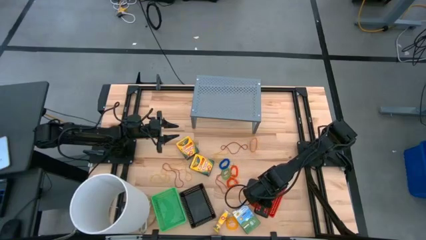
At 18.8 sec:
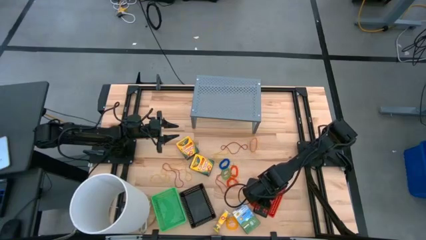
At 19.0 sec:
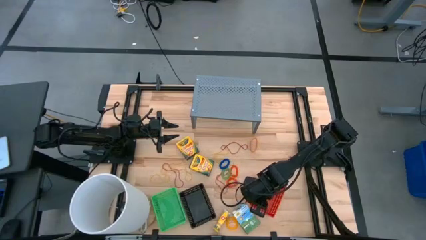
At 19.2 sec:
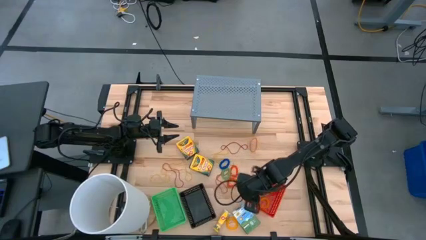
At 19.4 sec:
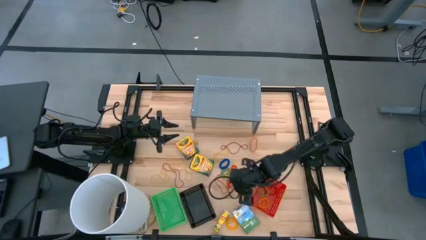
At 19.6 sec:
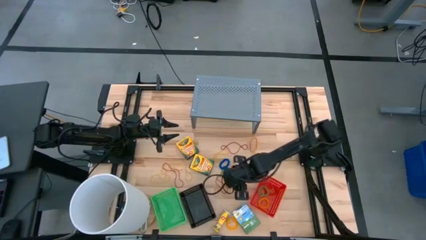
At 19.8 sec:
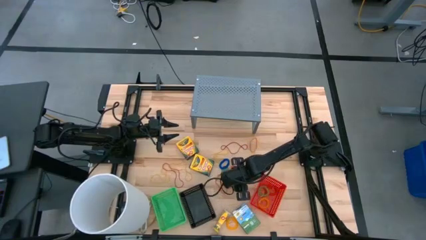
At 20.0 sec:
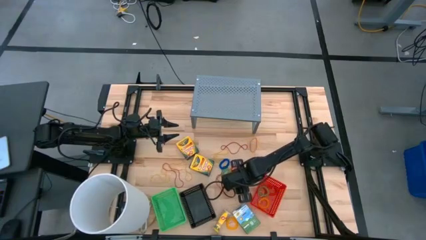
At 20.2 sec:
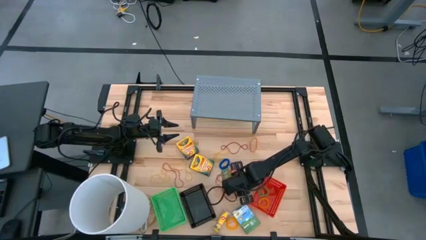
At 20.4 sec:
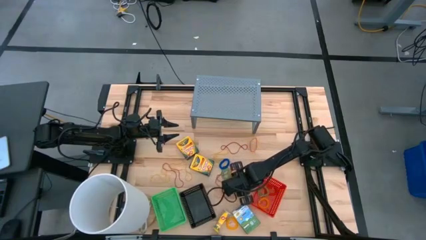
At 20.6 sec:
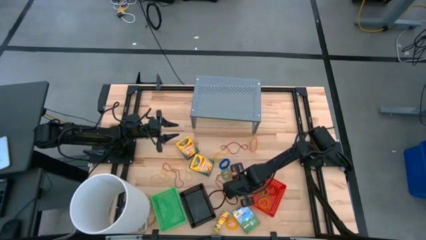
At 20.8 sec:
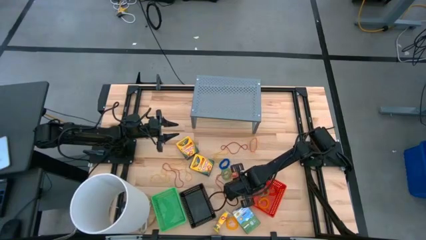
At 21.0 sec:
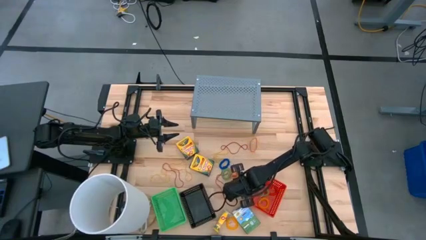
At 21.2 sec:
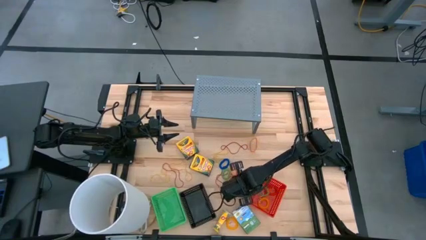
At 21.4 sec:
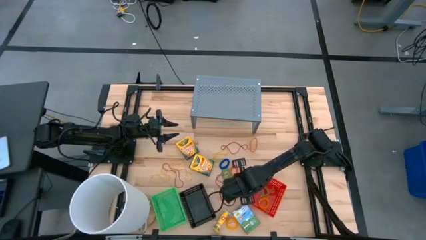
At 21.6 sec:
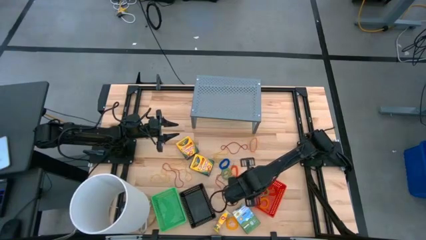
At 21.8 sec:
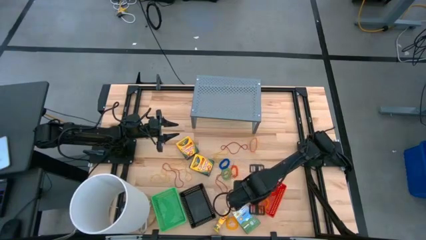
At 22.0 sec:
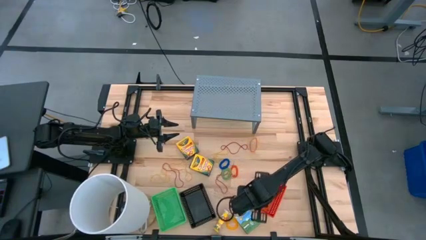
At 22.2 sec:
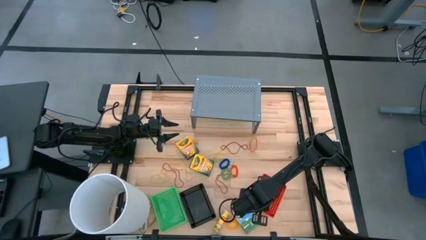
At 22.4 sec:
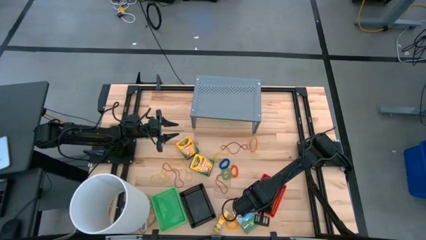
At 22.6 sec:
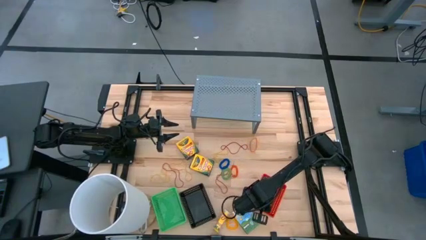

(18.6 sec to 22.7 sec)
Task: Pick & Place Office Desk Supplies
Put the orange spring keychain into the red bin

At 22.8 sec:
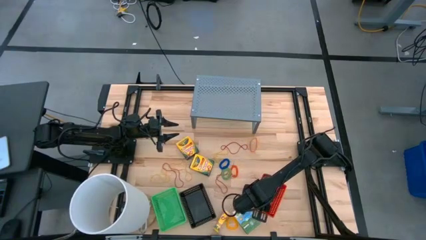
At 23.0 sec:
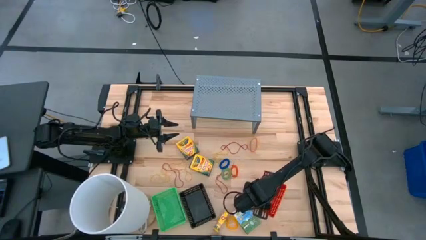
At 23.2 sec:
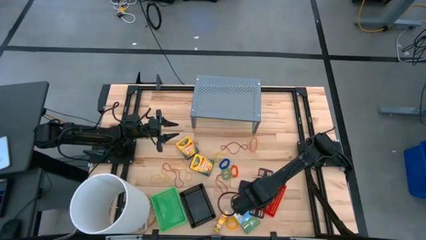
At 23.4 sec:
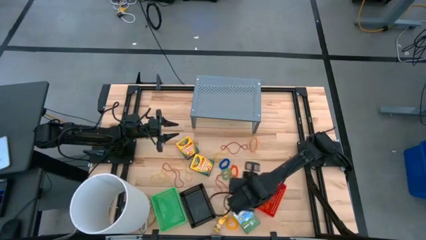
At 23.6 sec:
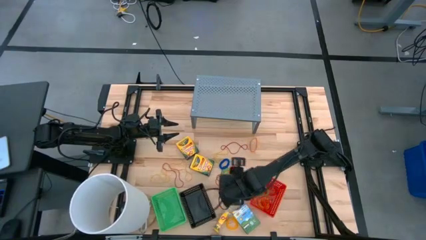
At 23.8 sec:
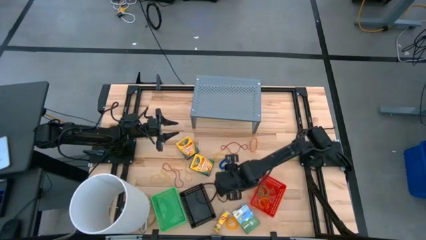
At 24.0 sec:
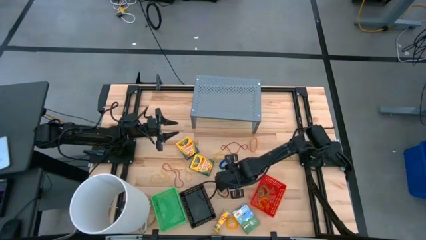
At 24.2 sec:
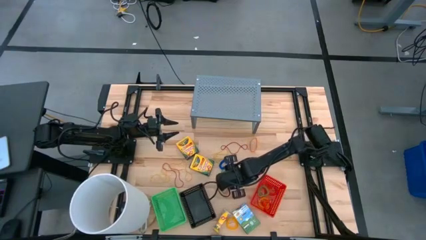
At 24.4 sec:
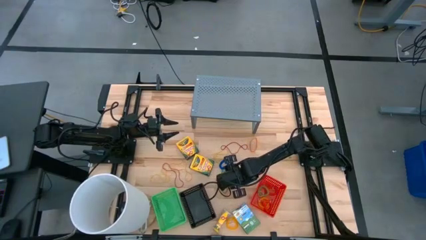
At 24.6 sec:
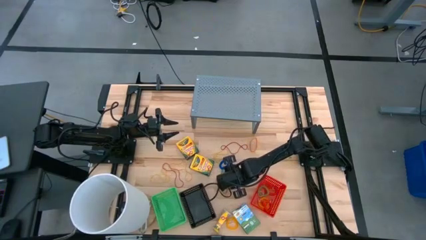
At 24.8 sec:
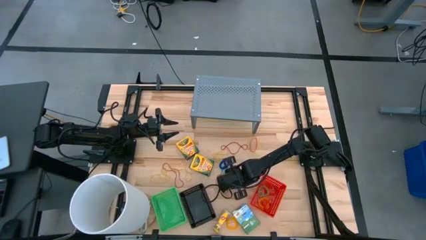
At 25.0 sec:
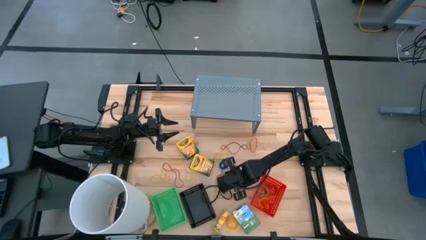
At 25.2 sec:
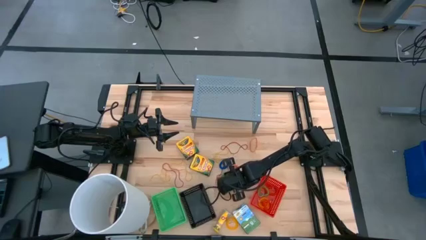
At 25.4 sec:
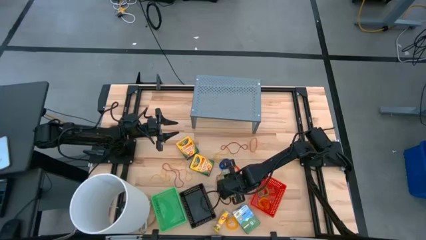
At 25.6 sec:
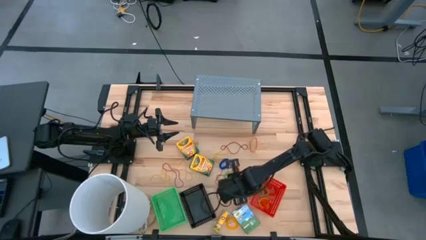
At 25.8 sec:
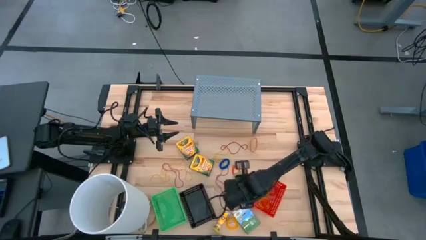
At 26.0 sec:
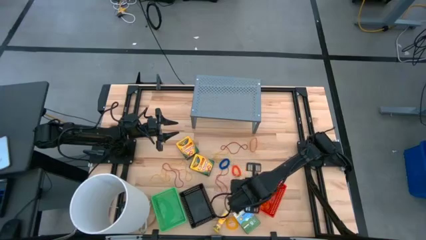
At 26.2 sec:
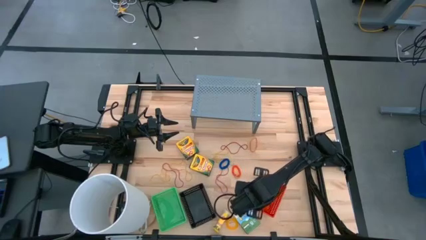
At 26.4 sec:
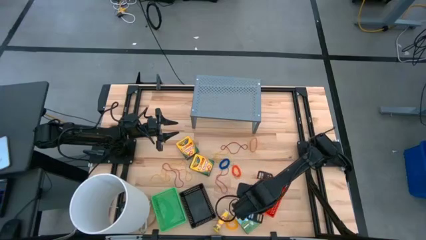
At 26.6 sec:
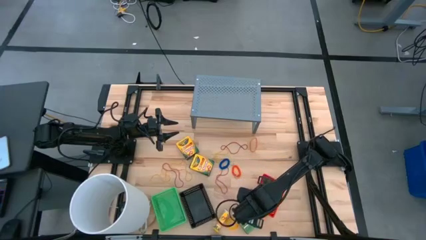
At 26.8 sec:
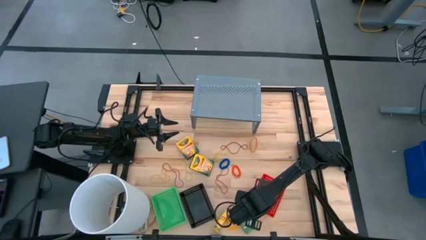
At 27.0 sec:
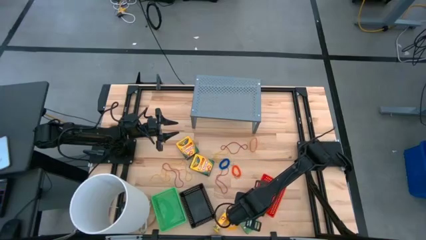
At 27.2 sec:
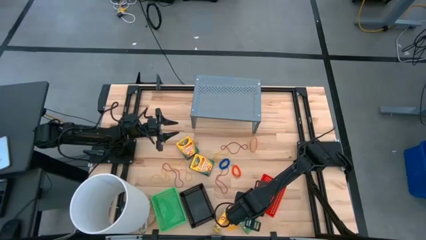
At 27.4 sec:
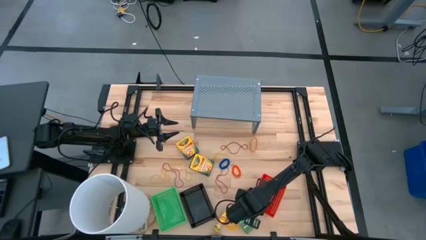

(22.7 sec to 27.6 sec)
Put the green spring keychain into the red bin

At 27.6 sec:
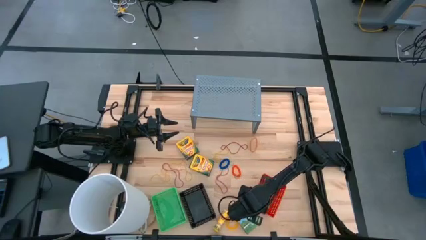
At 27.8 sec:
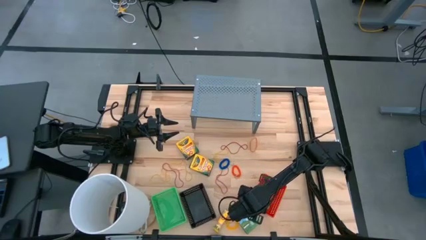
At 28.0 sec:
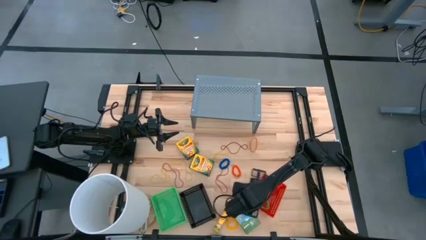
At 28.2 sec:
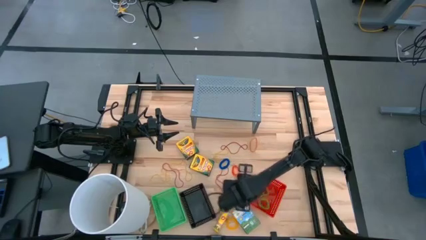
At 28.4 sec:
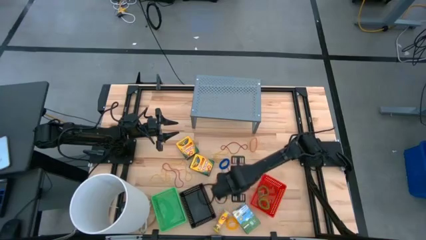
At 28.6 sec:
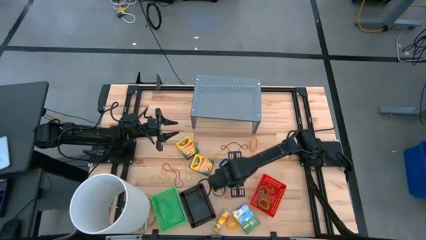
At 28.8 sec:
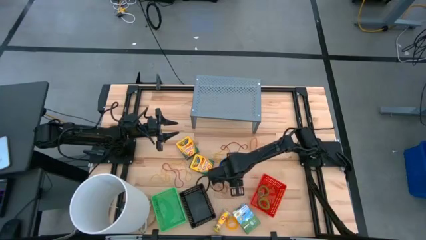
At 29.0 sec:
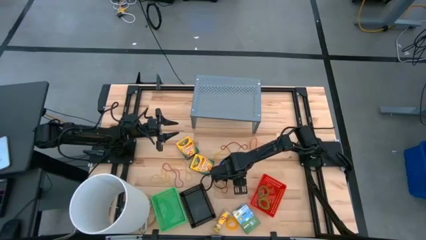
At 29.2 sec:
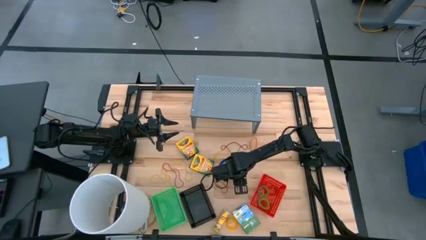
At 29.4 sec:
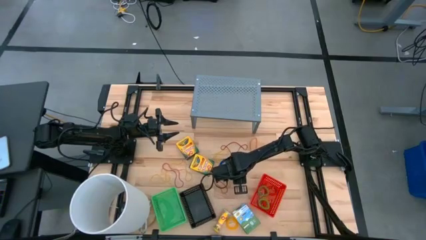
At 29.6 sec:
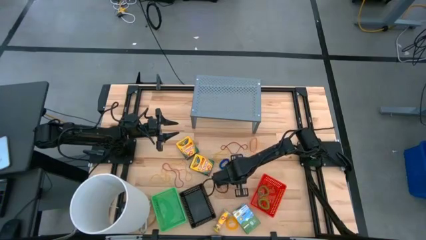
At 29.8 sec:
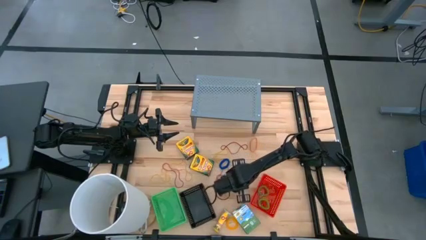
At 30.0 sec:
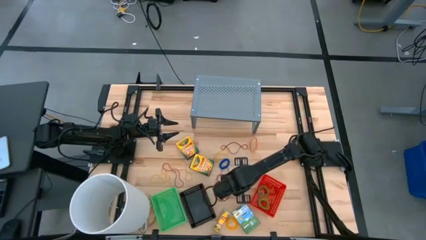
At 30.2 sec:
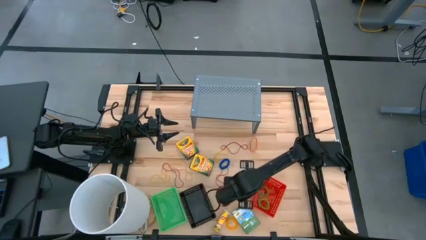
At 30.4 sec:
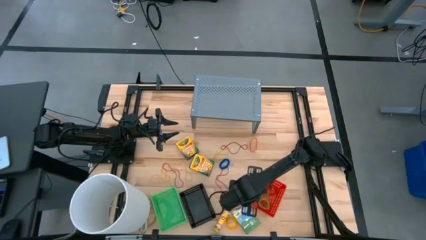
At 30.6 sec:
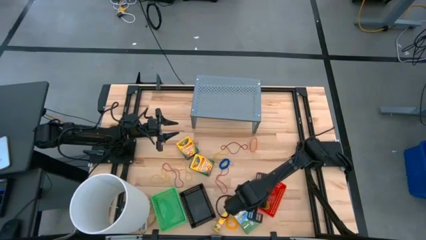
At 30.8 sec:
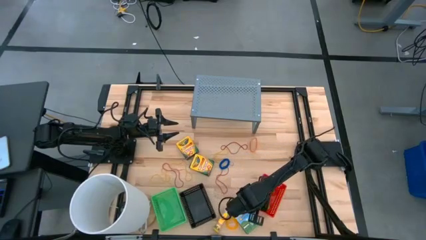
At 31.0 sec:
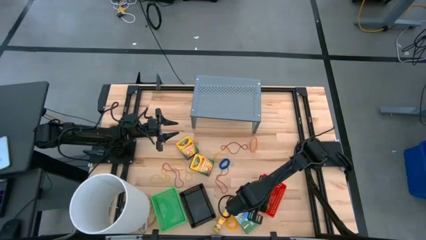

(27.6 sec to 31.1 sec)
Put the orange spring keychain into the red bin

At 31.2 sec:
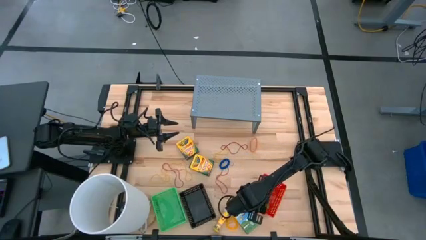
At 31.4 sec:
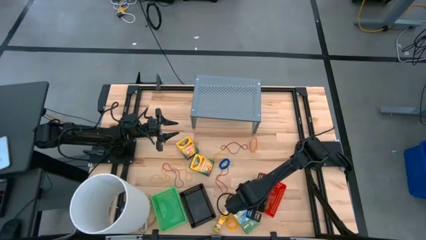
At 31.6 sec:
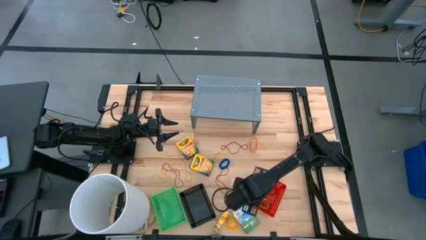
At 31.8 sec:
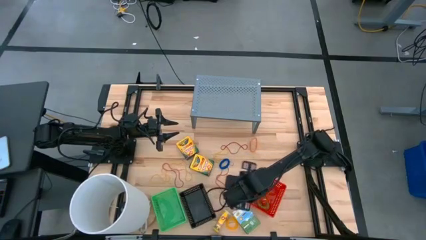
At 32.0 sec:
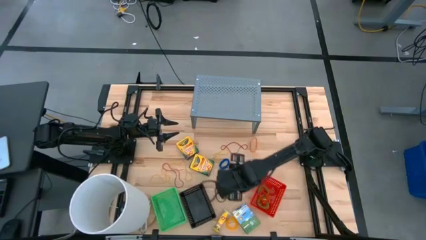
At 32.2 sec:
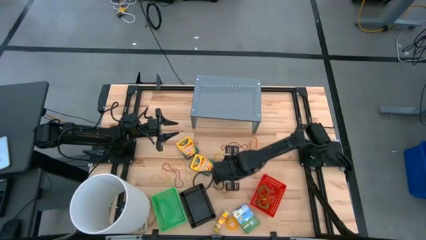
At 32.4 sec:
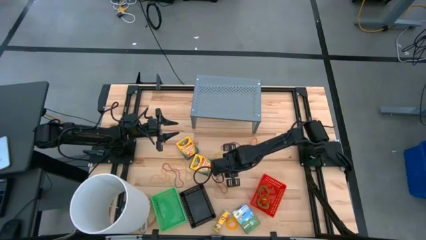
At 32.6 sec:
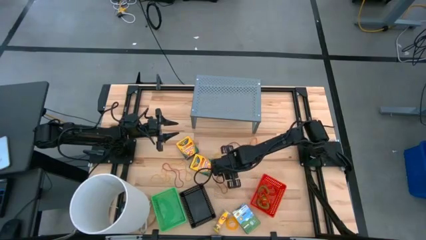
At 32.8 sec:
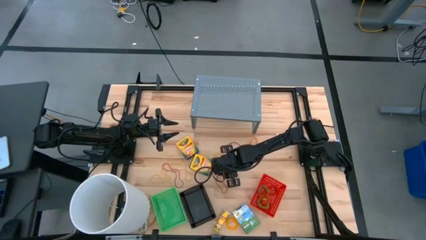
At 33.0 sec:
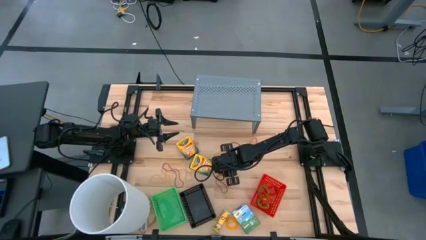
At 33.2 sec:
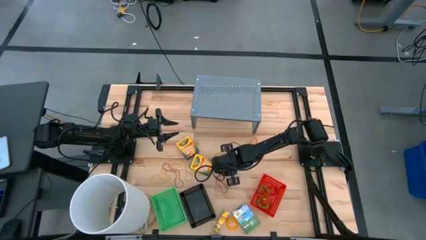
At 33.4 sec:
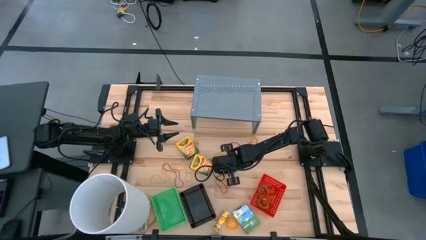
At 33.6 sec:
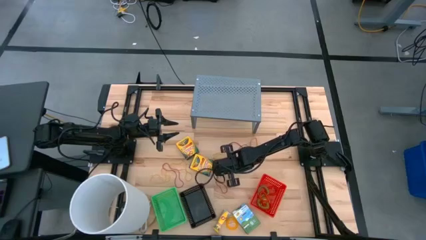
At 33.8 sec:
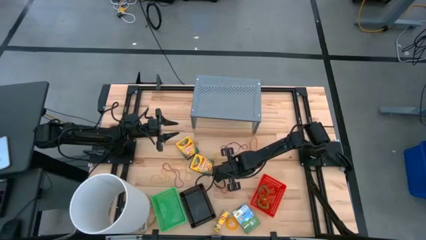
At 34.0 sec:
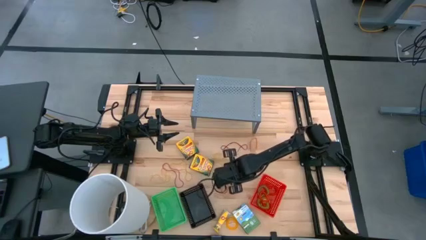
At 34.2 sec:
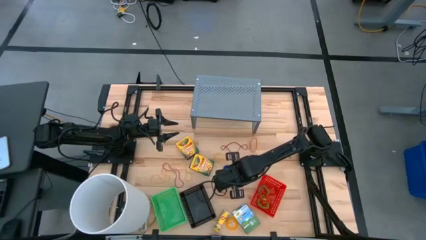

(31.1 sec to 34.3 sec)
Put the blue spring keychain into the red bin

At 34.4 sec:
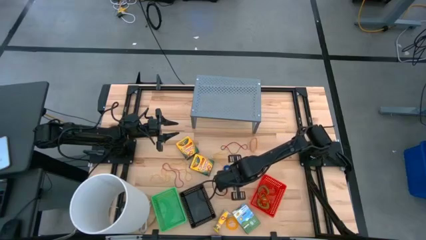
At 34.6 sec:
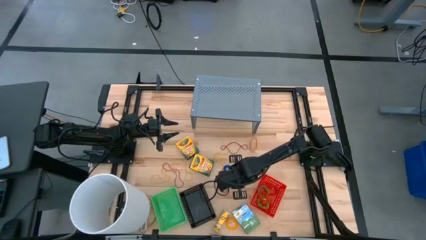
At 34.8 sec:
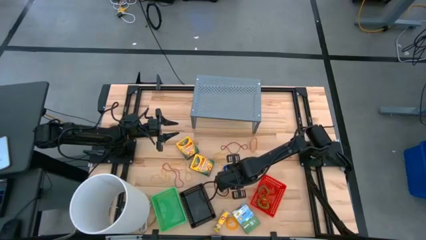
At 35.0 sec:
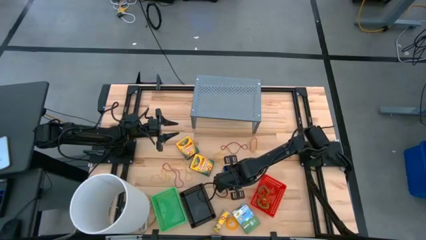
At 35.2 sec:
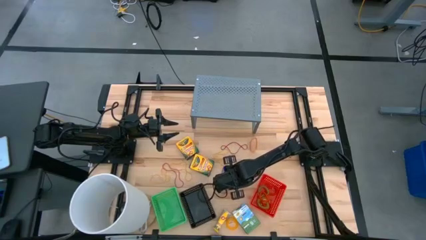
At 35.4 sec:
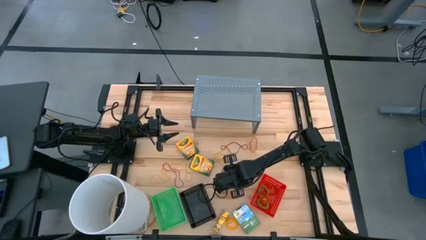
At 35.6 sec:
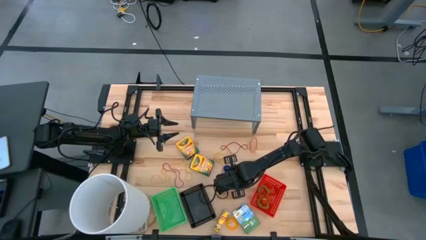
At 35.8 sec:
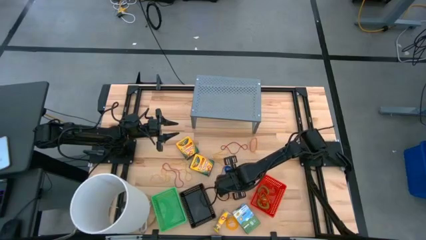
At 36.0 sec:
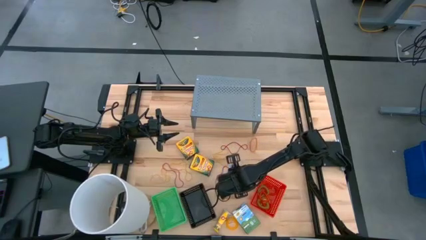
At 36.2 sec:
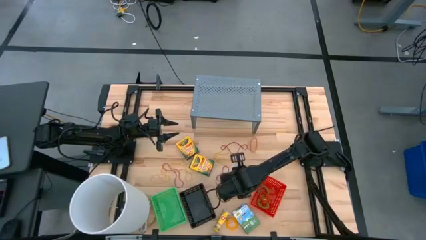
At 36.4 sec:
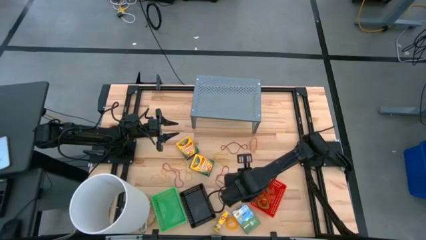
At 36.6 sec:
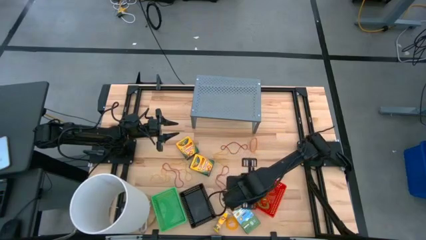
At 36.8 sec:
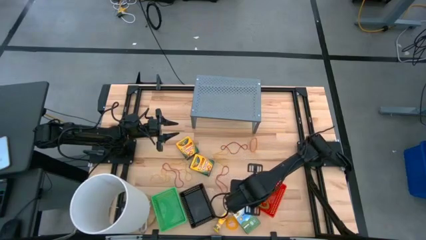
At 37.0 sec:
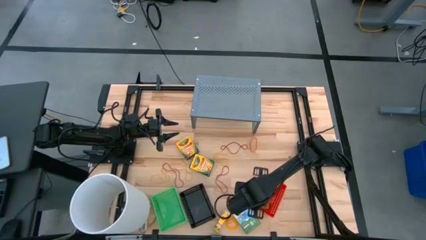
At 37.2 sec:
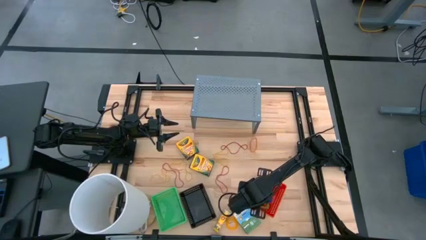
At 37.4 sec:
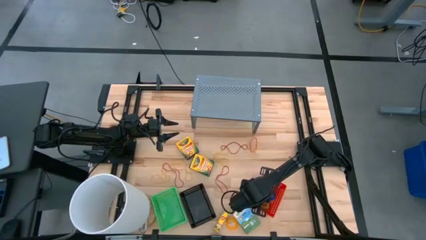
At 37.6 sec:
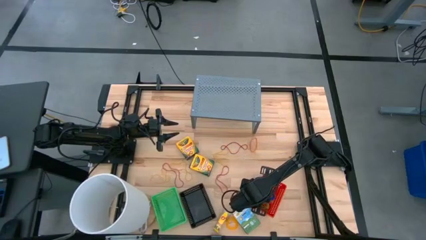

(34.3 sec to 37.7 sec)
Put the blue spring keychain into the red bin
